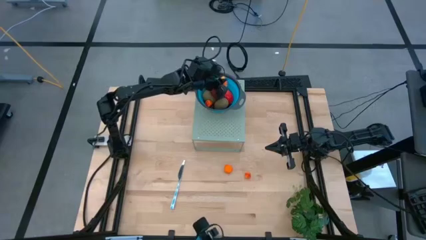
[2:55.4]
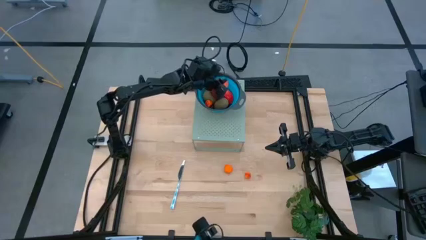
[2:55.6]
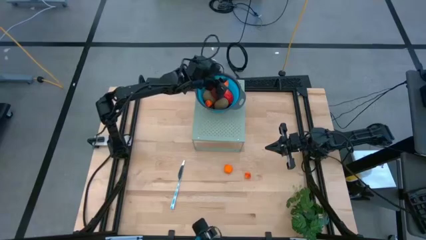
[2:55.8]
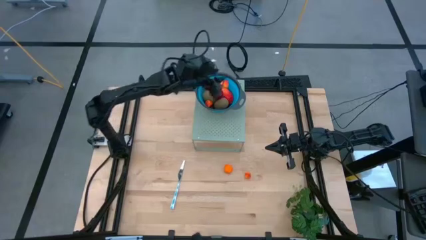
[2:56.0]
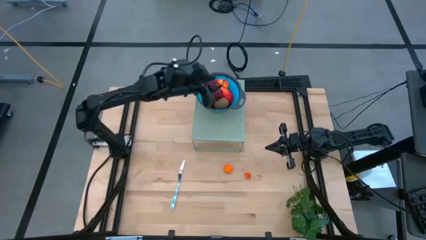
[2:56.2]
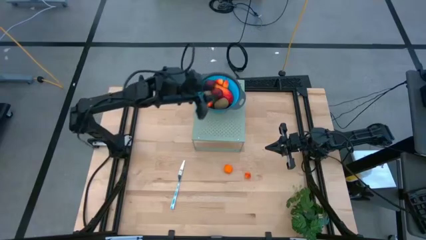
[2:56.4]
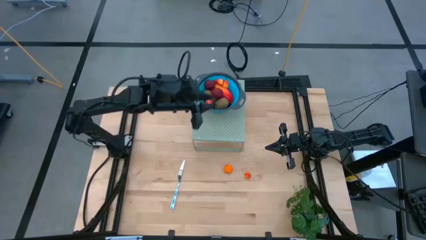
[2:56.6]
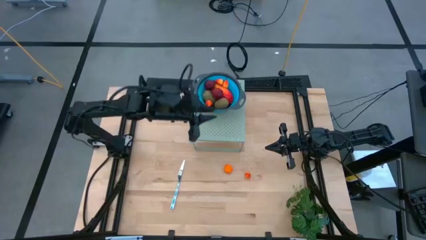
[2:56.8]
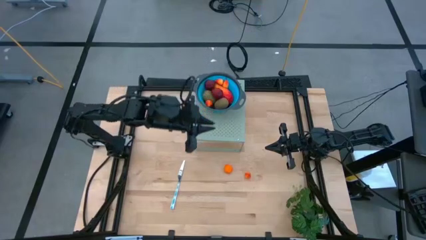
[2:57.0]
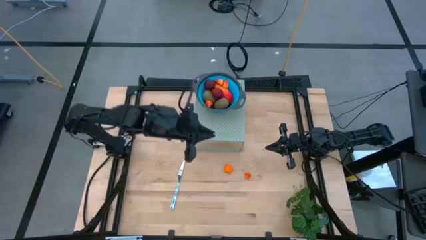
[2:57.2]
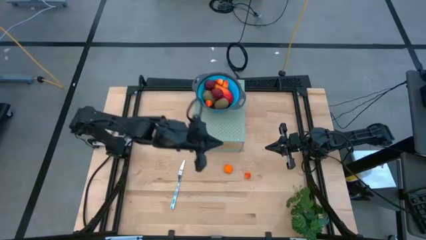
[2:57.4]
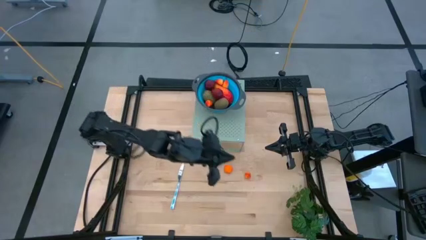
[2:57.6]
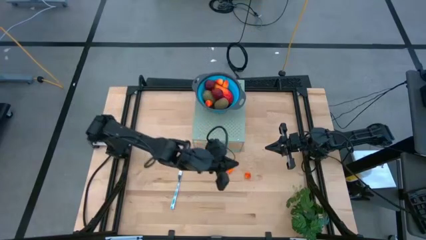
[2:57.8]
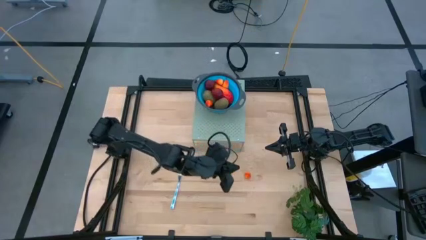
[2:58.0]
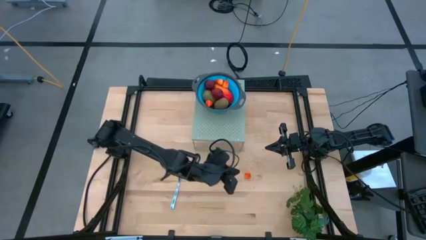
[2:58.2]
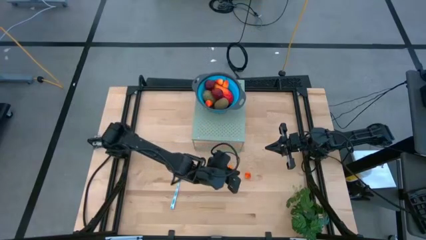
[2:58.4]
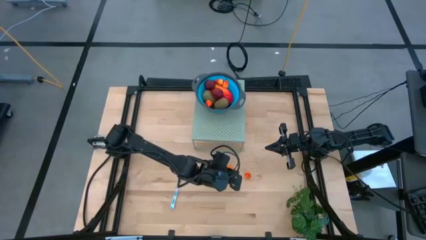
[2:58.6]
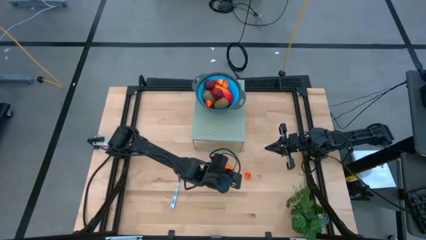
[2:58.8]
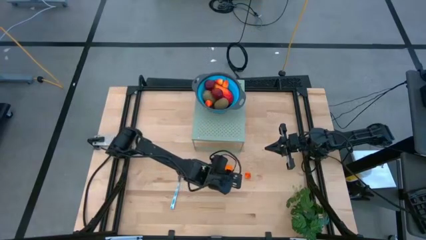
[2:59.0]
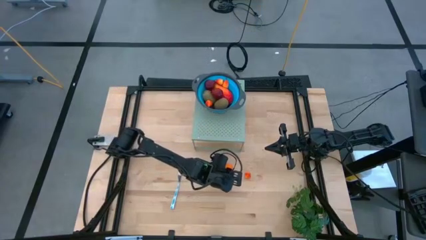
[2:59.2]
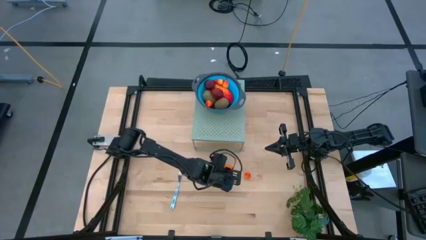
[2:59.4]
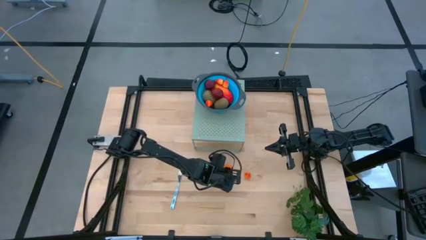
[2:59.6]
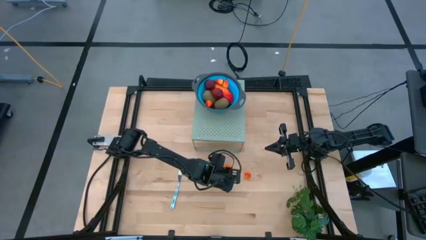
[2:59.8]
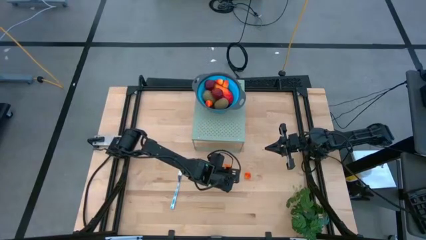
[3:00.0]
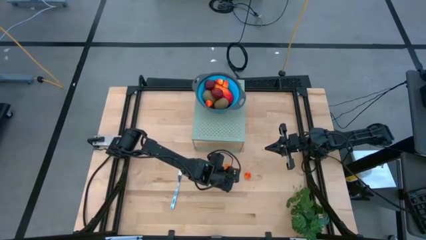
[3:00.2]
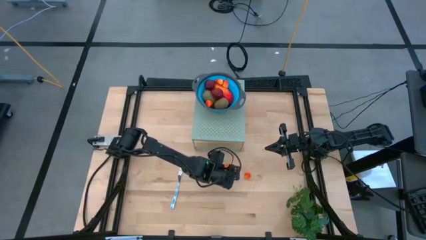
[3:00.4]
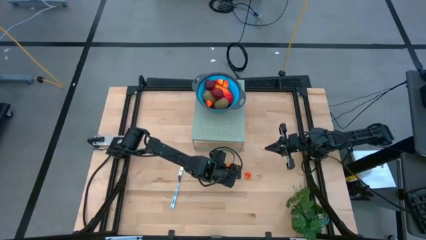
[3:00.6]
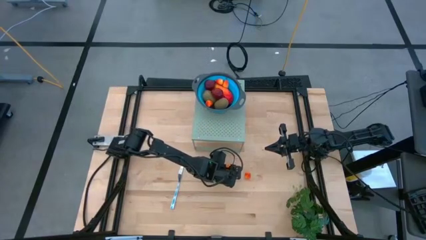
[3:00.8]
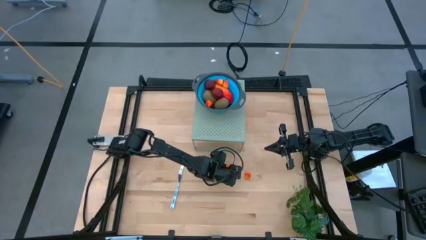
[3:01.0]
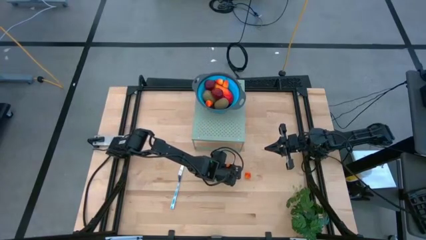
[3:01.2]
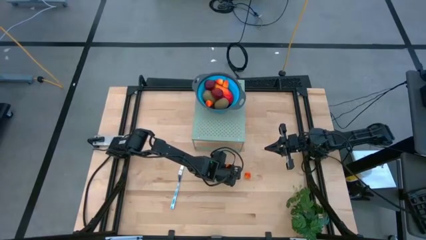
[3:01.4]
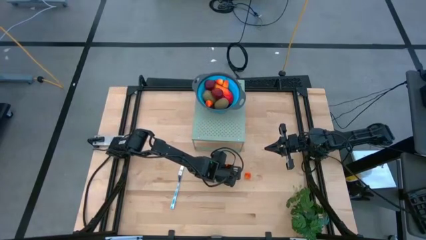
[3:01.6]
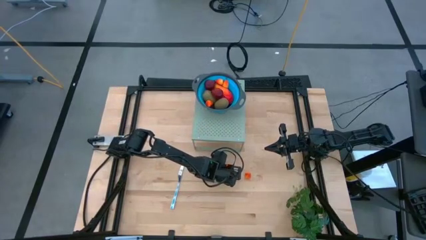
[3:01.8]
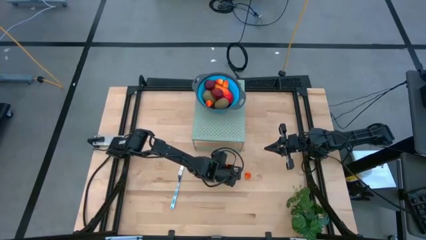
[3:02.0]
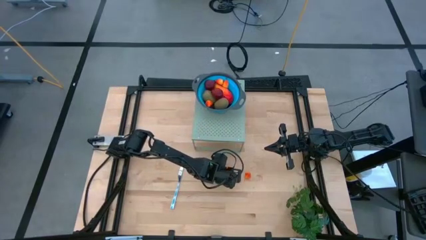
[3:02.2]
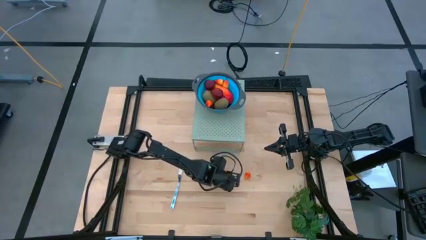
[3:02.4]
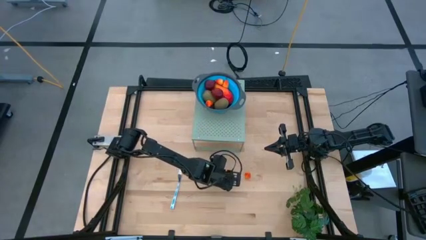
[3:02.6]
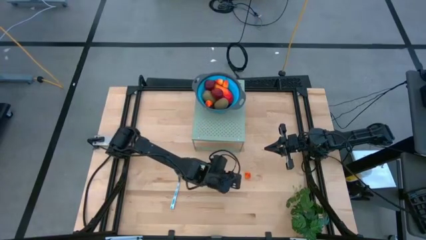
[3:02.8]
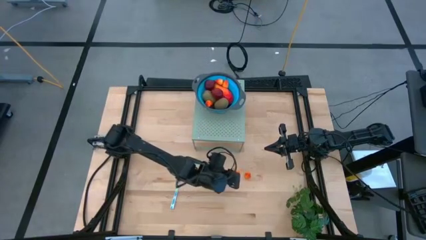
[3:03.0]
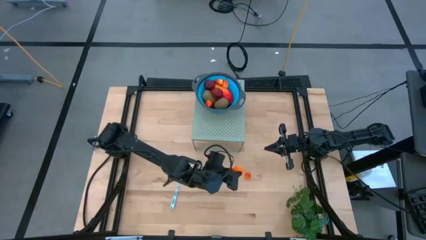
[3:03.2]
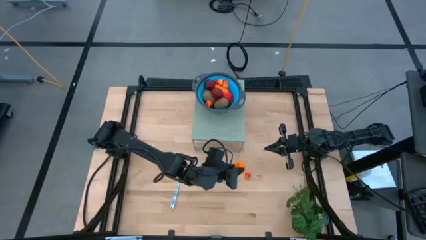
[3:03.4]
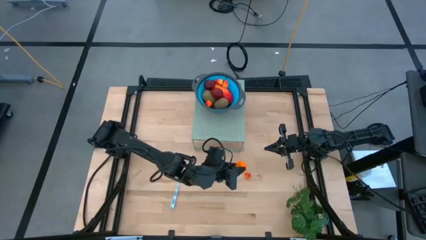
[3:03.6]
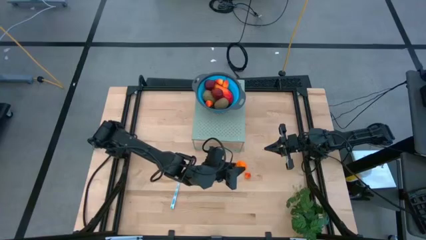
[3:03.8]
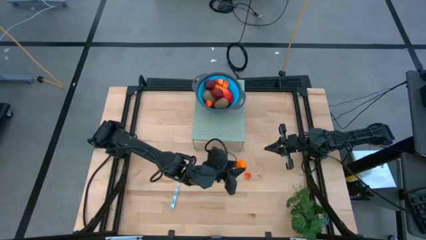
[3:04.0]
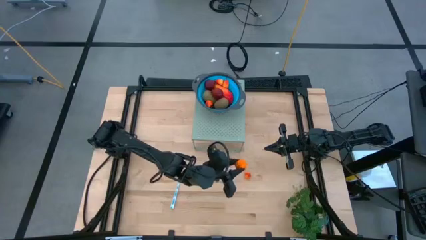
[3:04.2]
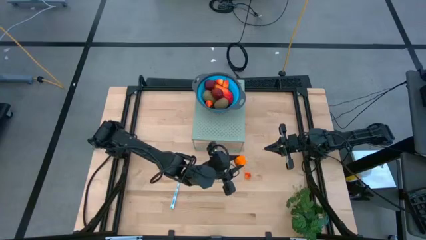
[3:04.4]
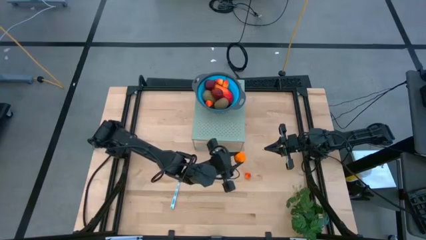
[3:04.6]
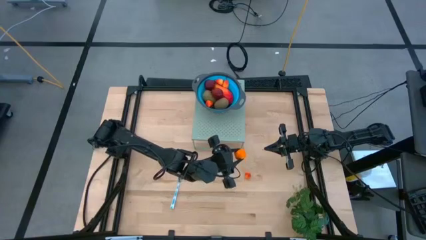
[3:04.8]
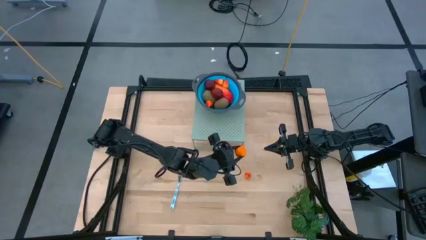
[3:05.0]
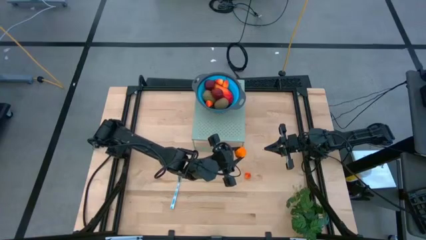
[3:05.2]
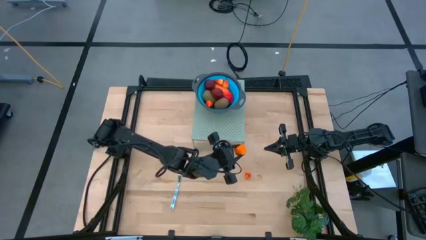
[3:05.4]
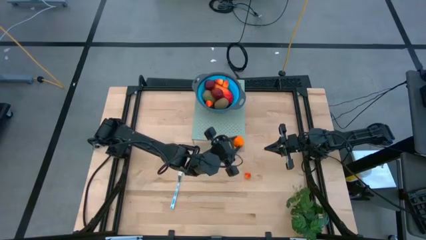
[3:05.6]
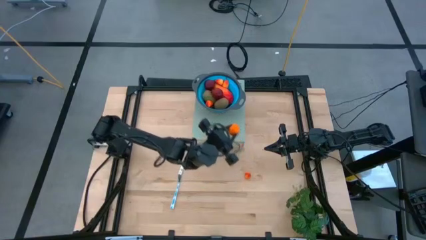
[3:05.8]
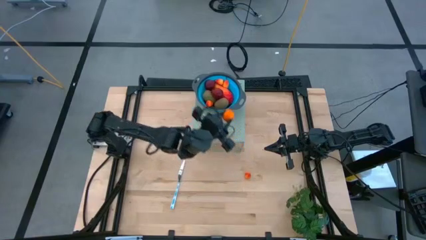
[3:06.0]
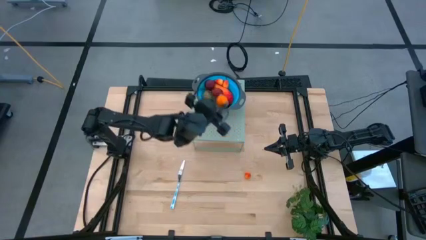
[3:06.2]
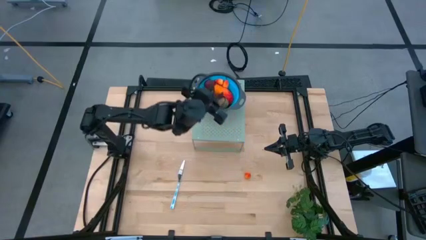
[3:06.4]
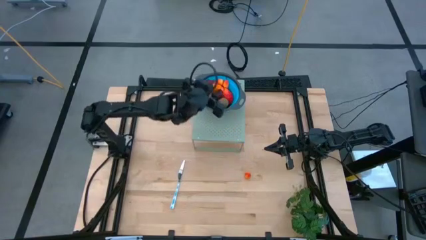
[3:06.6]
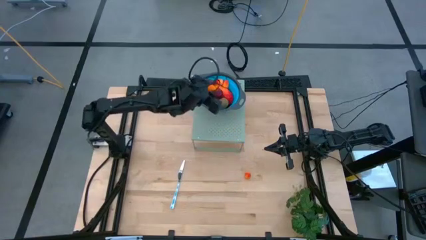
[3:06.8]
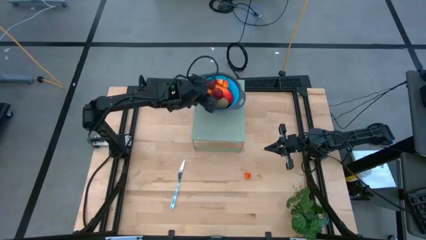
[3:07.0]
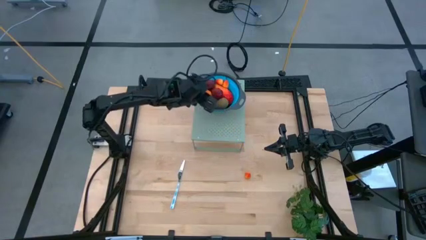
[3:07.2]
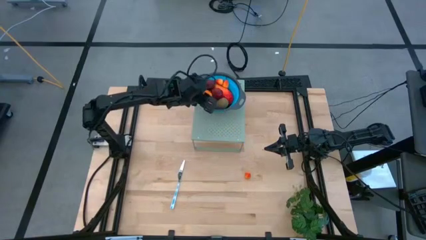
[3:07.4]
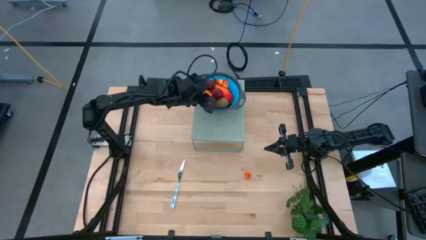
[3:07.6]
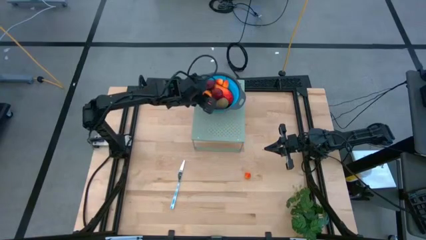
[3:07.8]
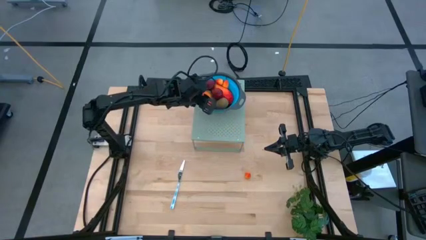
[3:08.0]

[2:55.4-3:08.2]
Task: Pick & Place Fruit
Put the orange into the blue strainer bowl on the shelf

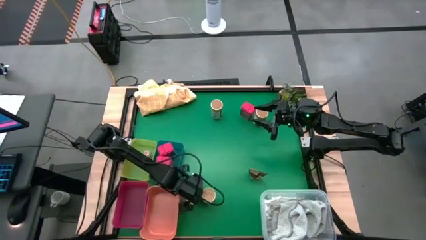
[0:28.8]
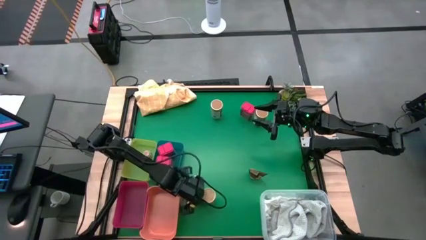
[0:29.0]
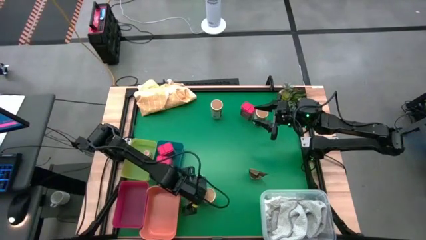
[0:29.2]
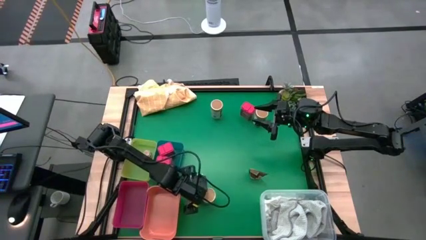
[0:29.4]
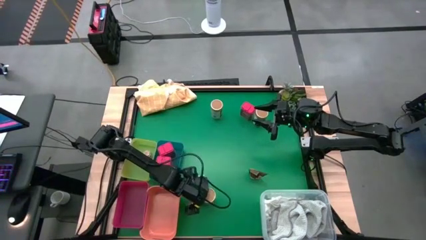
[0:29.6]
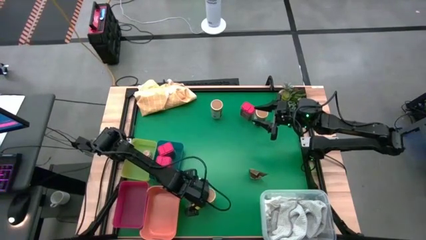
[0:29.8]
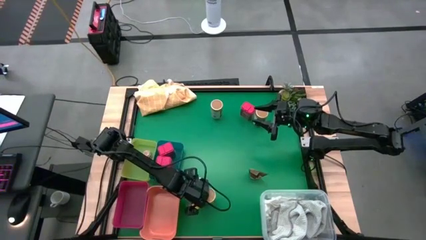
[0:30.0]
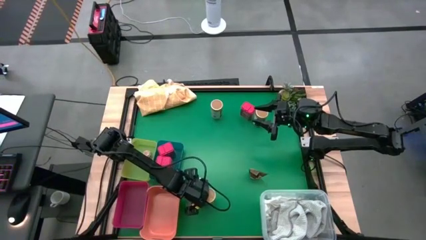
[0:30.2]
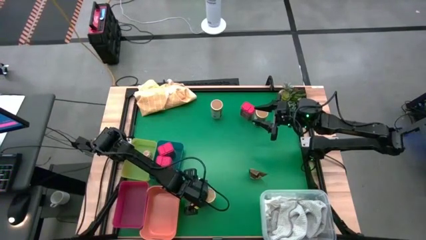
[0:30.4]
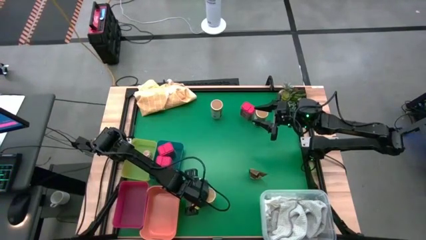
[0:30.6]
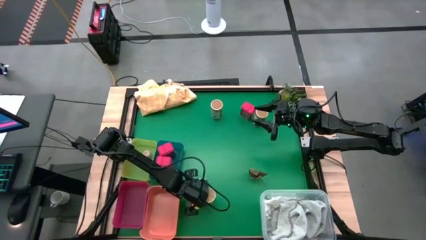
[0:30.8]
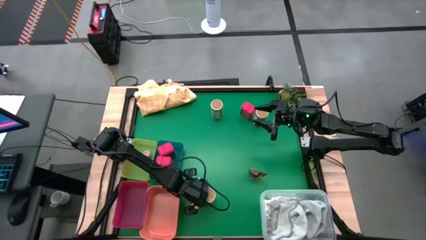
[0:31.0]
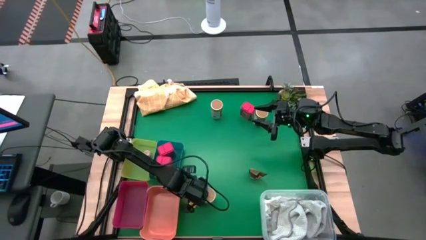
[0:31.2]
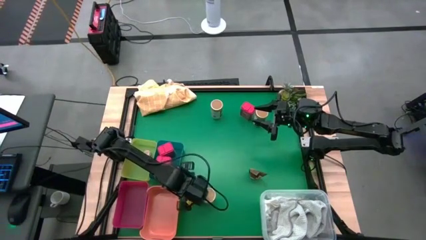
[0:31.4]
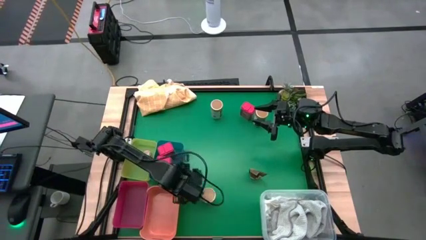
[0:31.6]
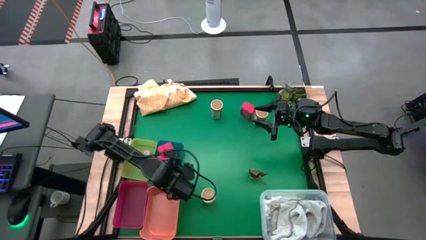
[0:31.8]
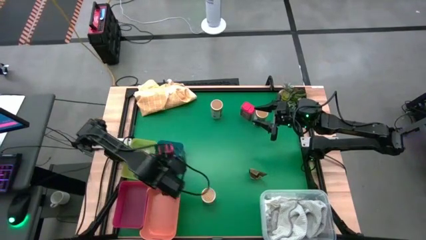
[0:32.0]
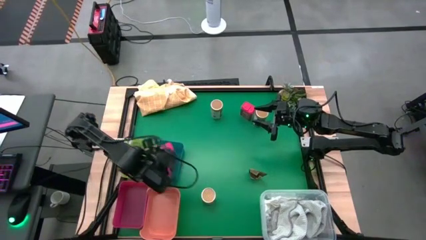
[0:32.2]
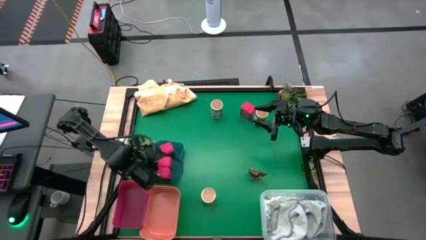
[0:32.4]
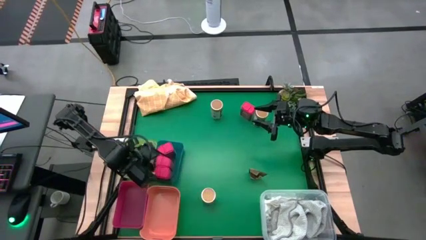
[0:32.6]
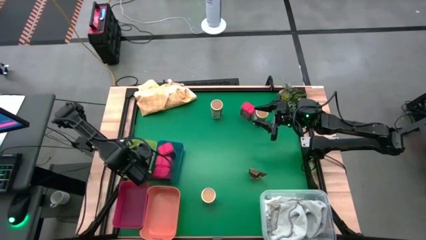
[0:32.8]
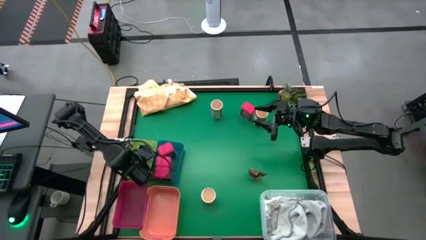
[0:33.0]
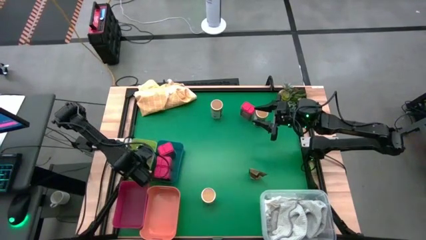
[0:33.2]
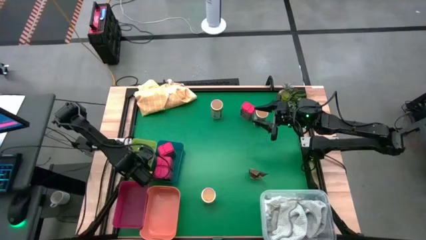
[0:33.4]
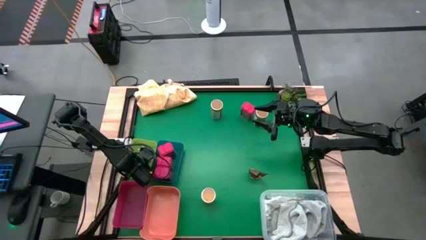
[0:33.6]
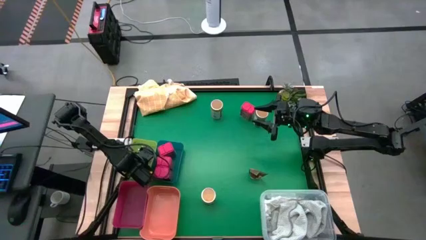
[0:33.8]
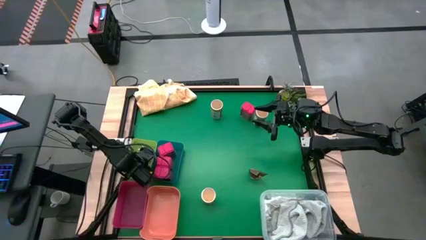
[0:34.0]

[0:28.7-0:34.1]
Task: Sort spices by type
Put the brown seasoning bottle into the yellow bin
